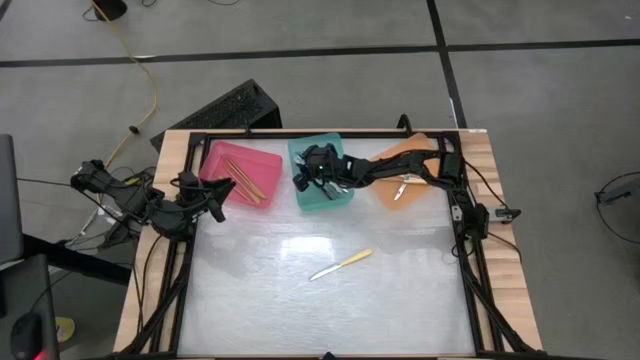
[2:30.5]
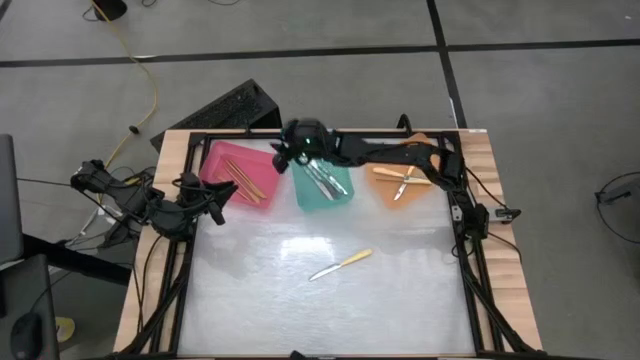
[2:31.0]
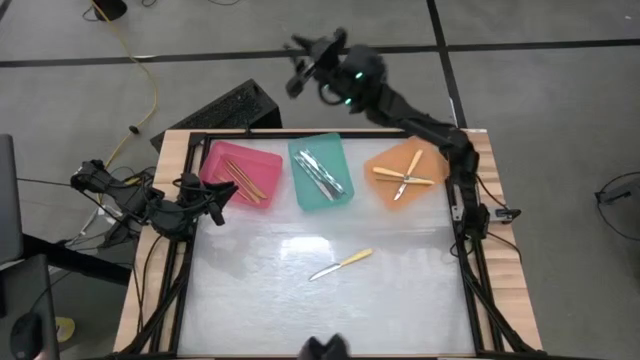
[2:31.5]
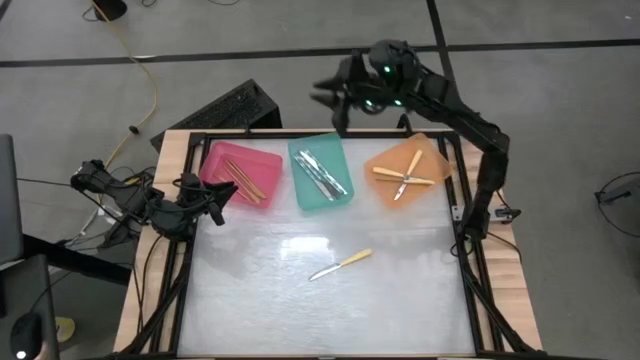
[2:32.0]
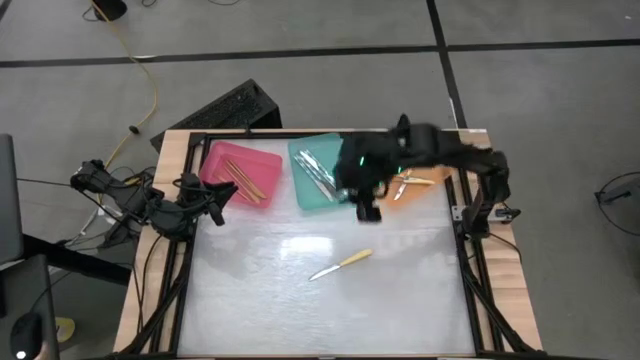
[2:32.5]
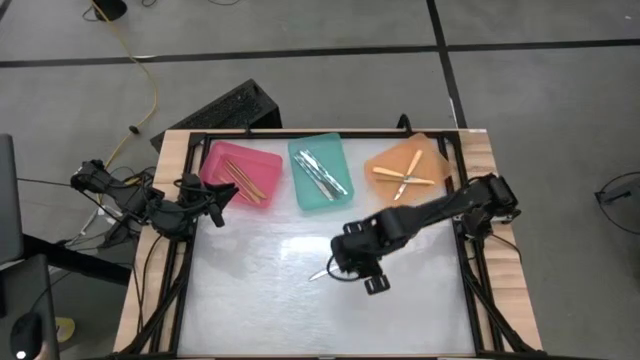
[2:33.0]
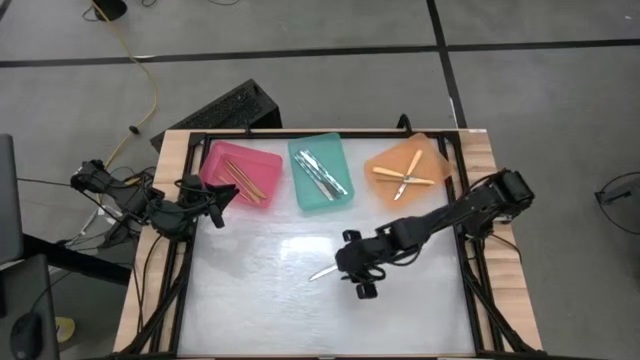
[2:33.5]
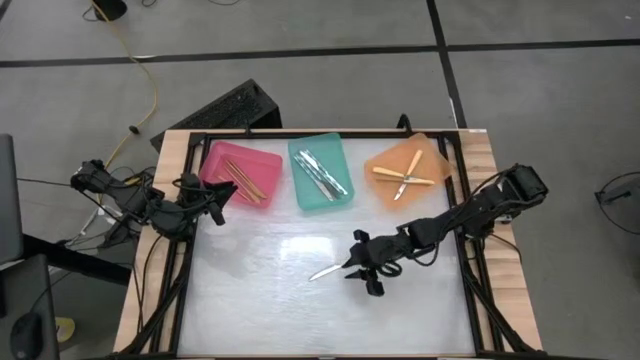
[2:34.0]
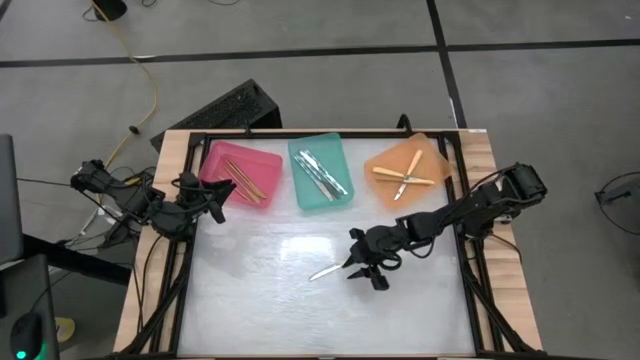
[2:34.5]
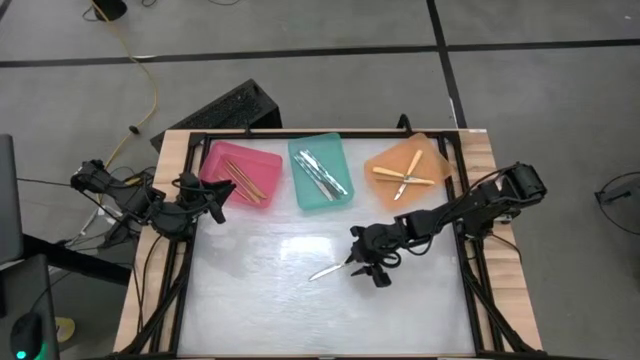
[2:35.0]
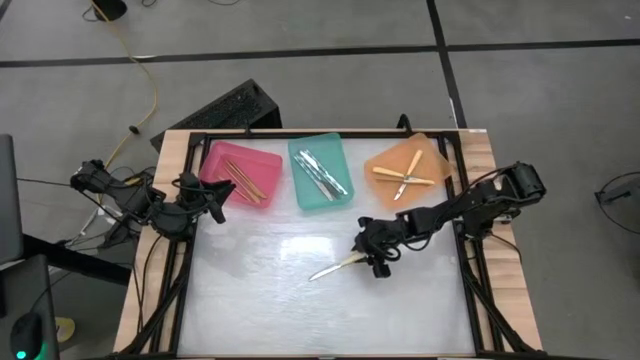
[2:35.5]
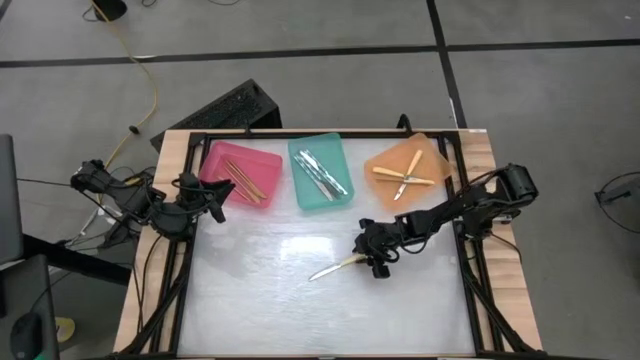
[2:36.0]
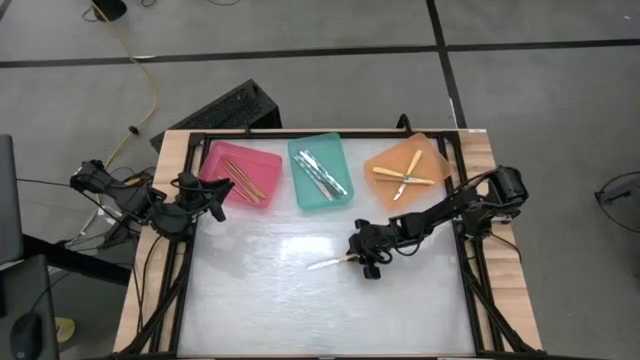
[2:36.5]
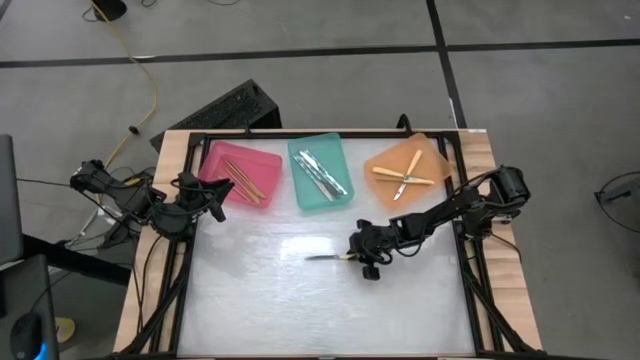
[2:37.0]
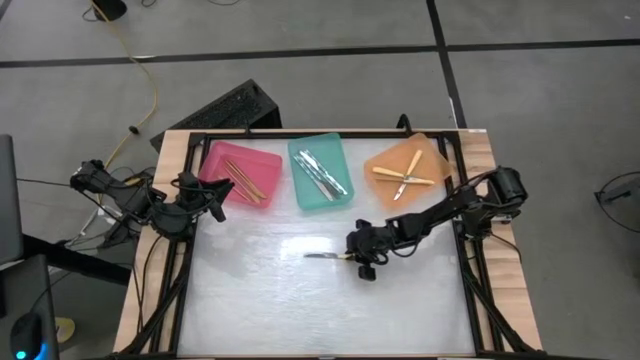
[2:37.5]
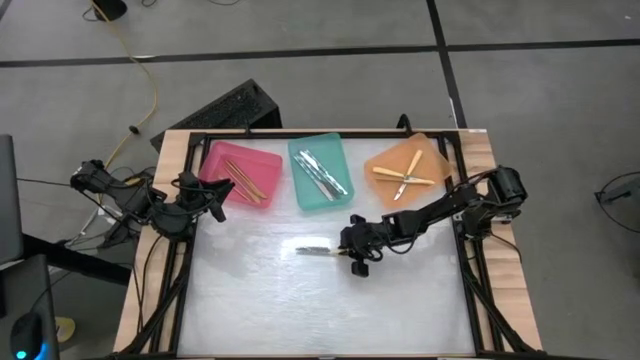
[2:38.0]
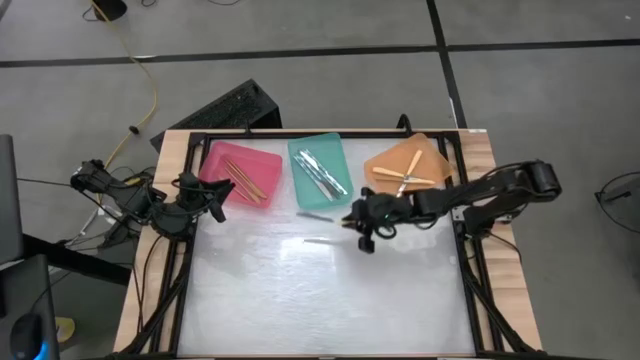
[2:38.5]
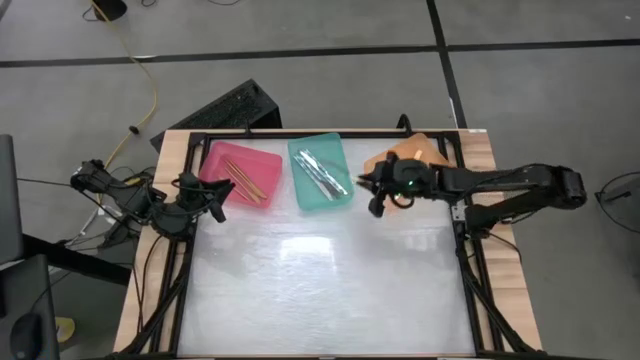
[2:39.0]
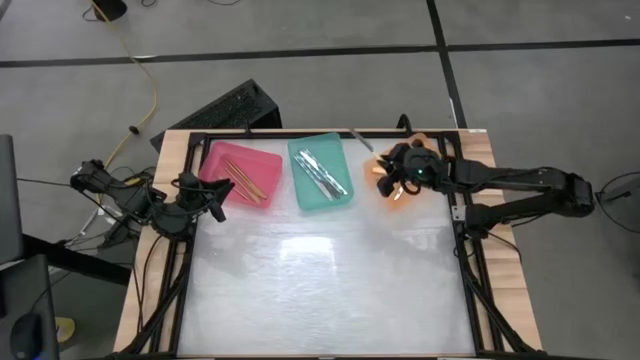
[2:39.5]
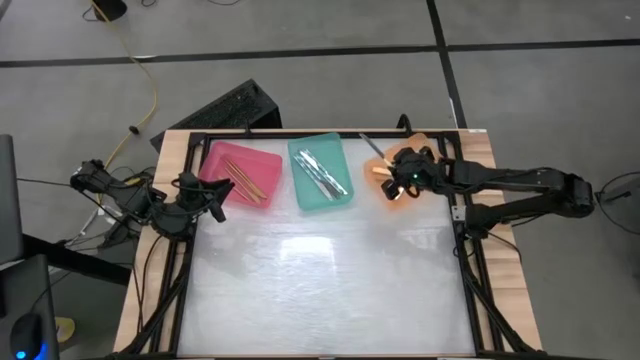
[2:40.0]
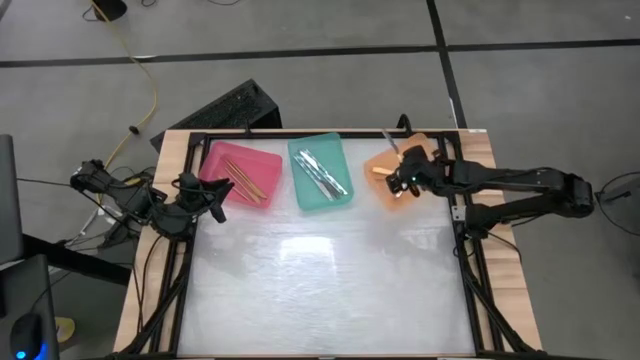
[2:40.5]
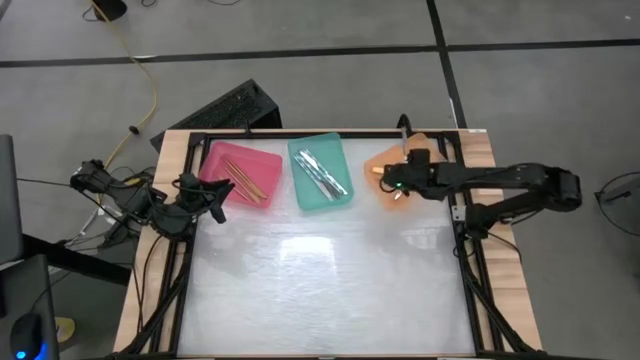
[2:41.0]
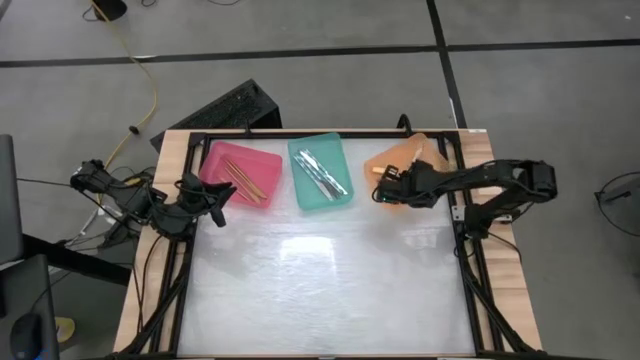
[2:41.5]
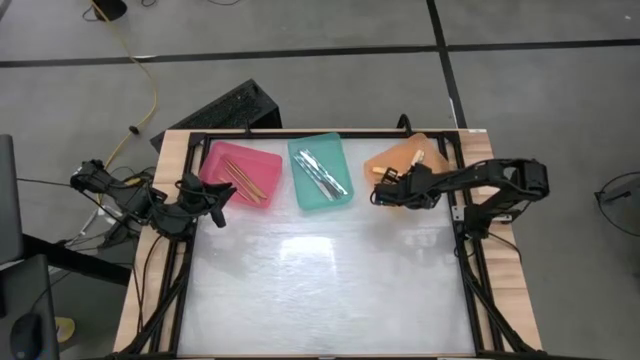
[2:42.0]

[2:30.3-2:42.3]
Task: Sort silverware by color (type)
Put the yellow knife into the orange bin

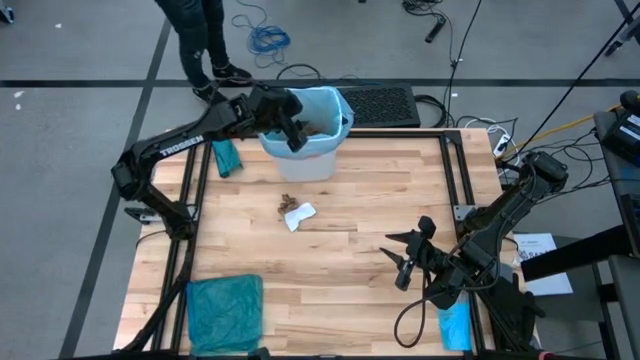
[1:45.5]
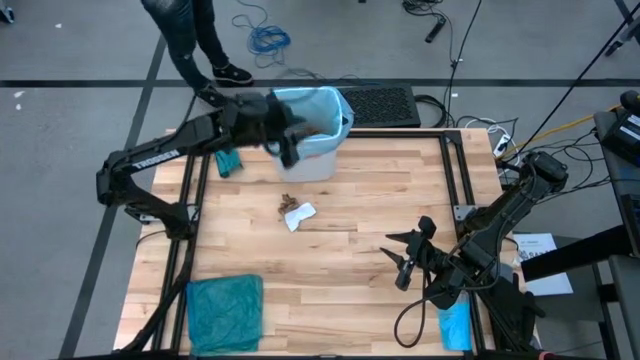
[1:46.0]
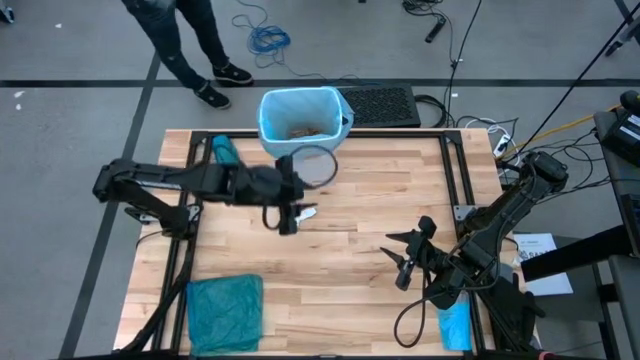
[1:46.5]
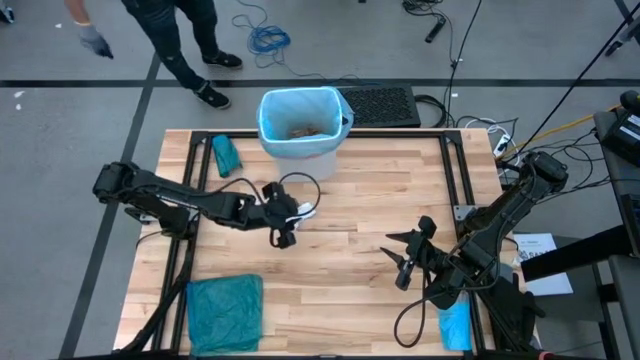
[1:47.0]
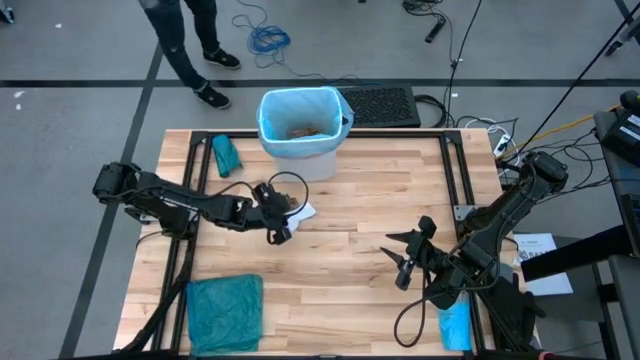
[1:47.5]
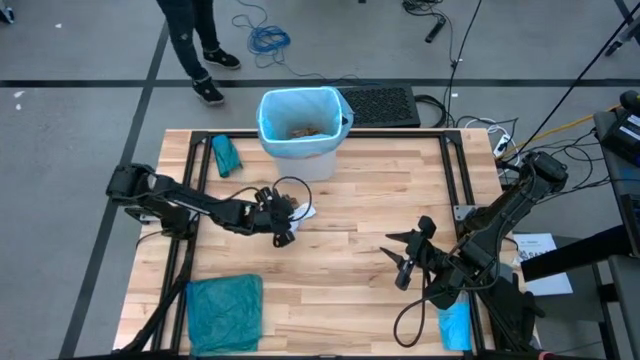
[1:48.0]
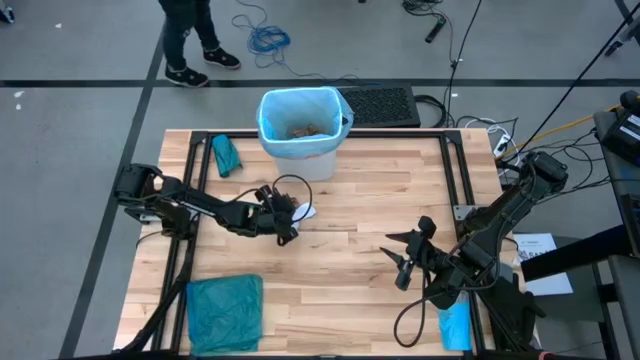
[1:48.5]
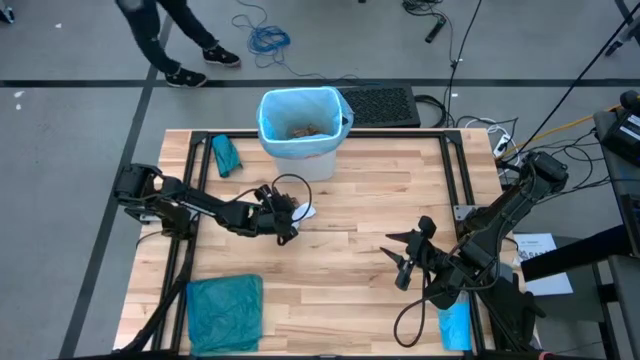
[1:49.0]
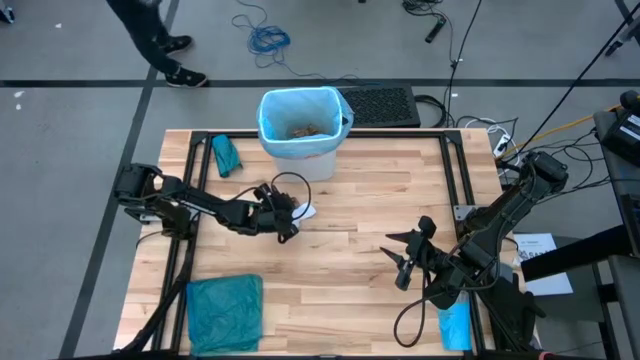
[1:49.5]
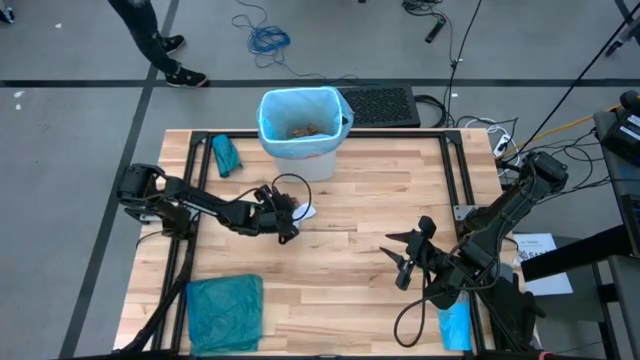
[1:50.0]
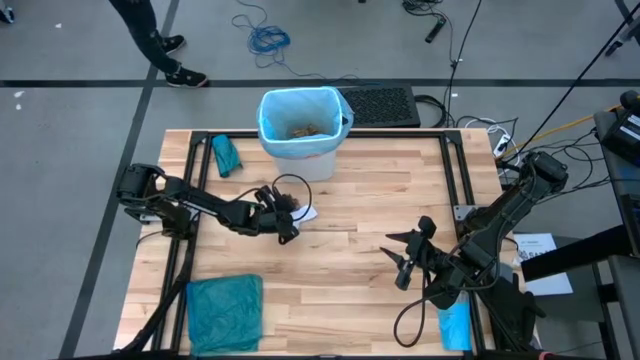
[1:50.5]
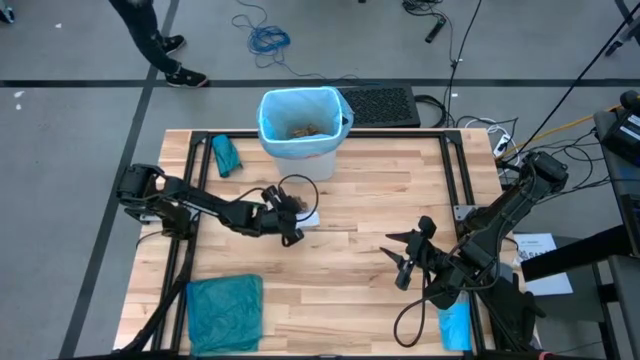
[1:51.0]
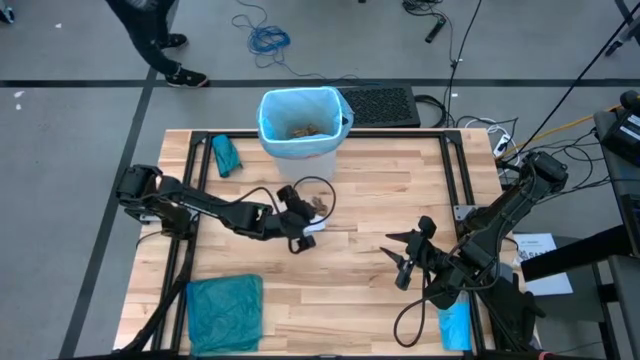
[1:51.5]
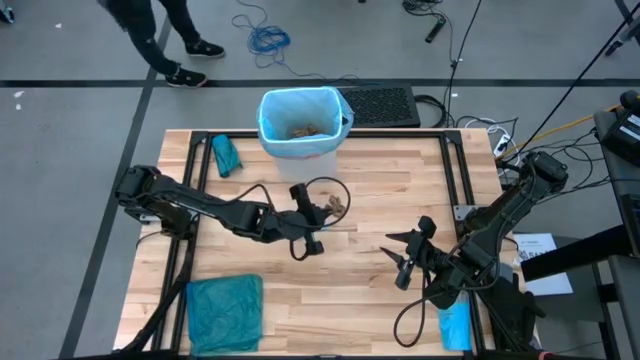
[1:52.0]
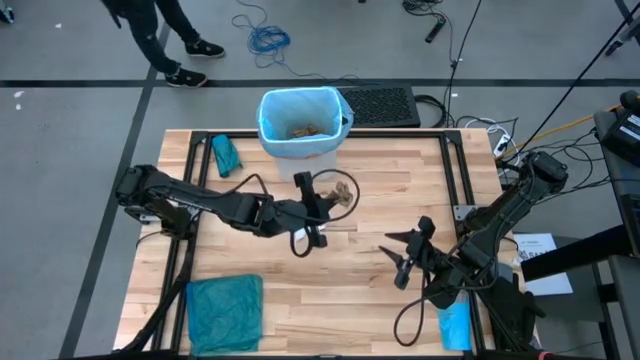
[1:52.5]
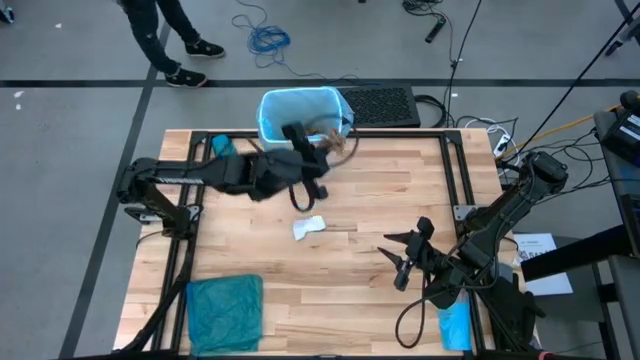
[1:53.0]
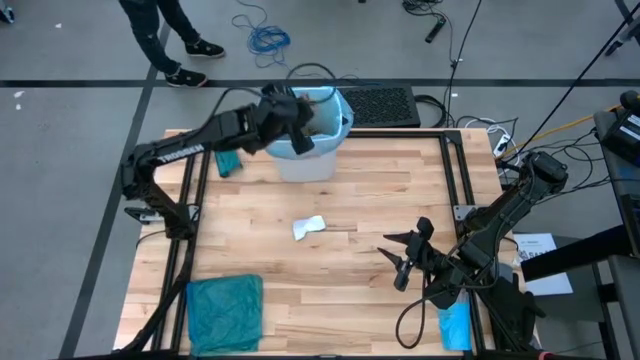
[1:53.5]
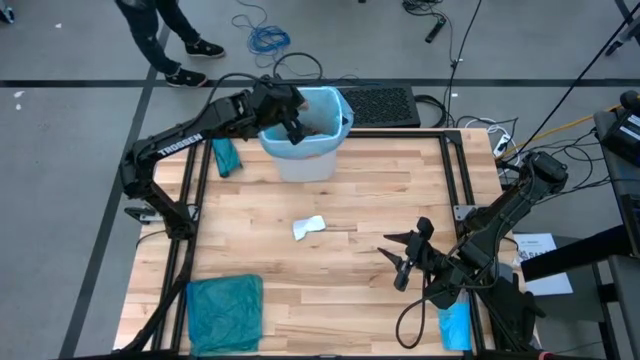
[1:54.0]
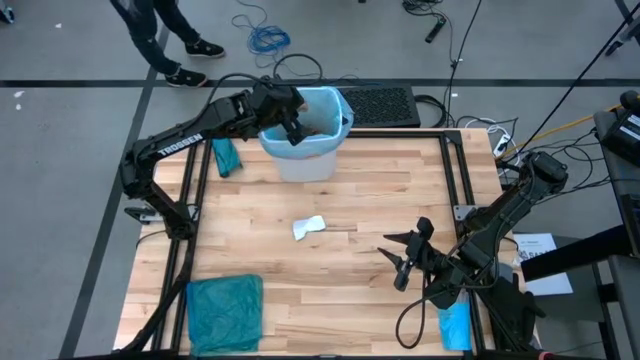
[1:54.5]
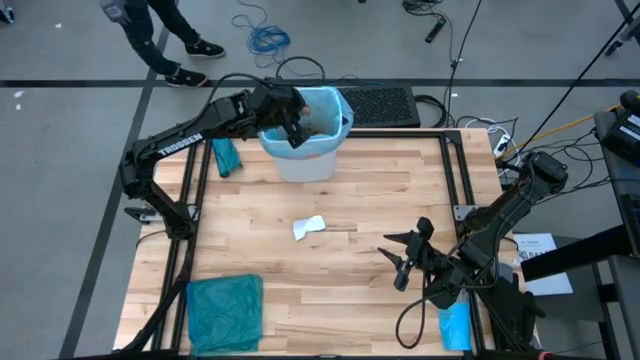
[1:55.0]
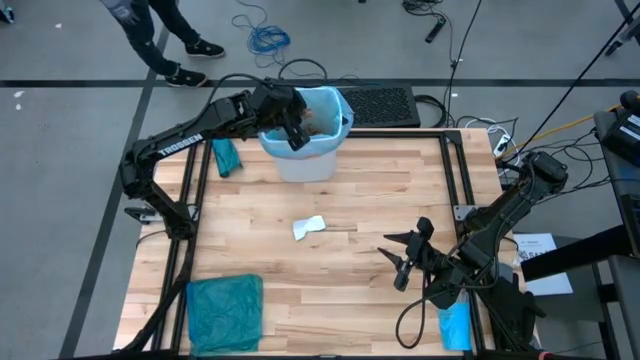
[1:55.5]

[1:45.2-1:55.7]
Task: place trash/remove bag and relplace
Put the brown paper into the blue trash bag inside the white trash bin
